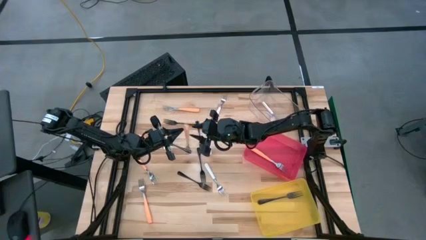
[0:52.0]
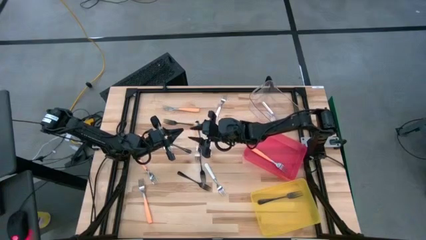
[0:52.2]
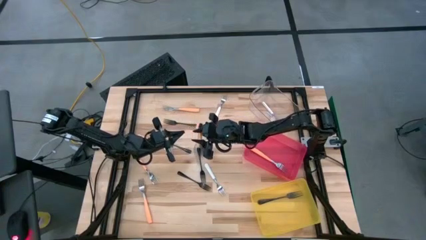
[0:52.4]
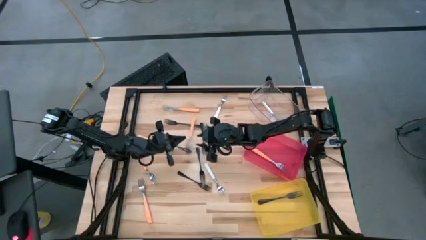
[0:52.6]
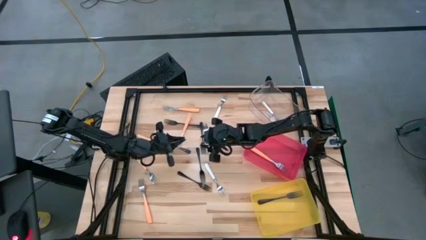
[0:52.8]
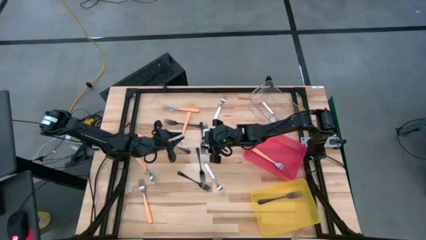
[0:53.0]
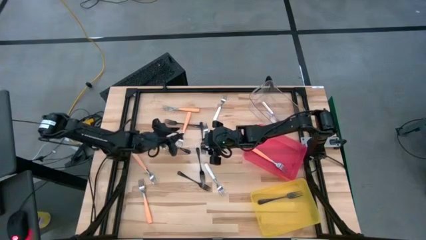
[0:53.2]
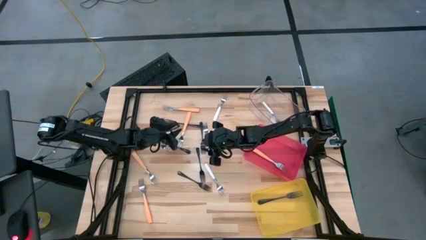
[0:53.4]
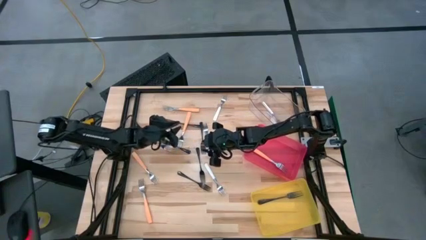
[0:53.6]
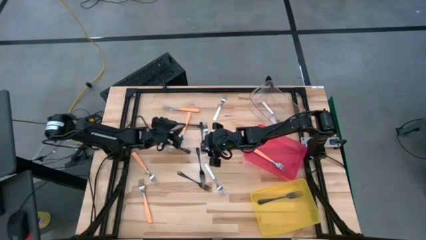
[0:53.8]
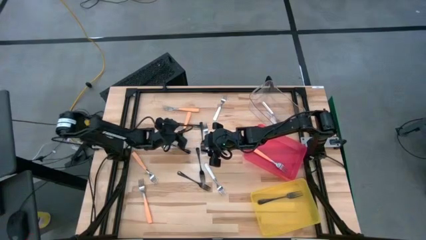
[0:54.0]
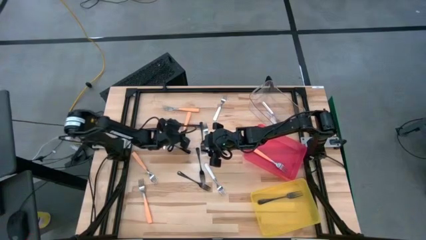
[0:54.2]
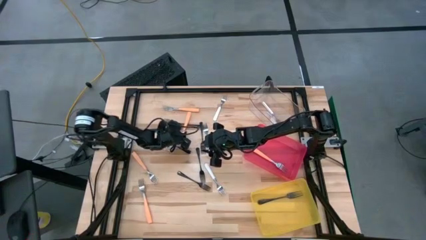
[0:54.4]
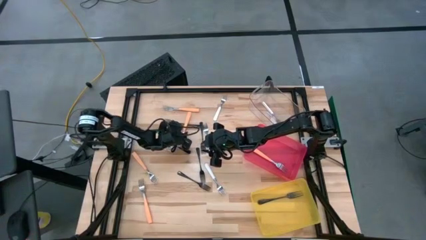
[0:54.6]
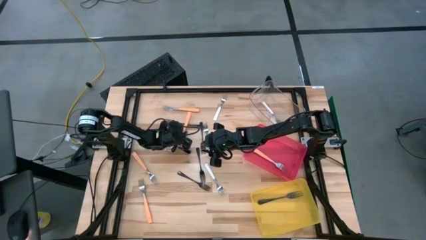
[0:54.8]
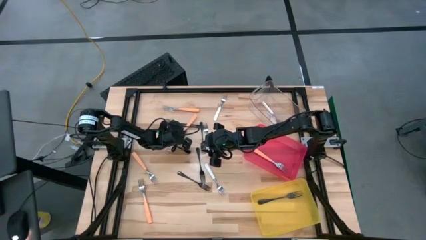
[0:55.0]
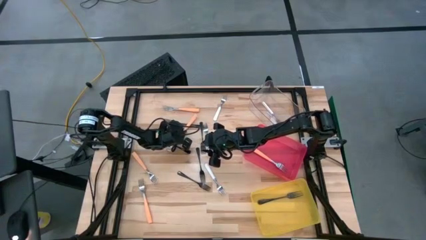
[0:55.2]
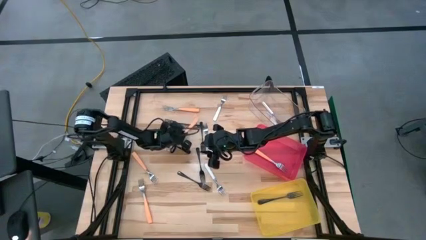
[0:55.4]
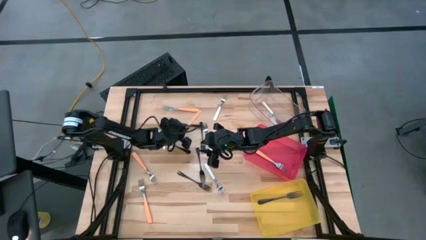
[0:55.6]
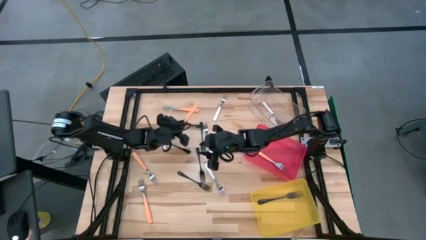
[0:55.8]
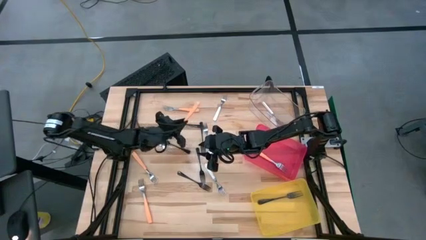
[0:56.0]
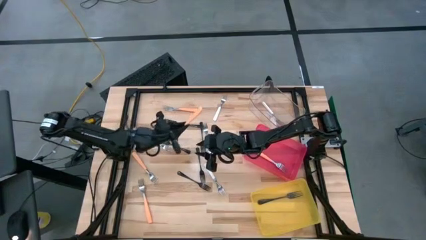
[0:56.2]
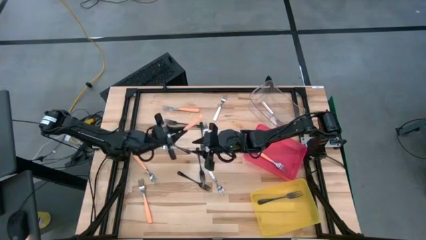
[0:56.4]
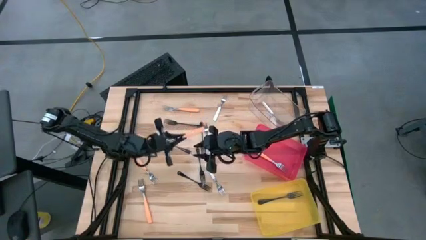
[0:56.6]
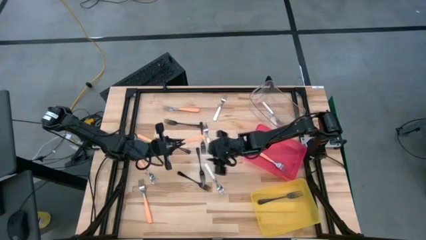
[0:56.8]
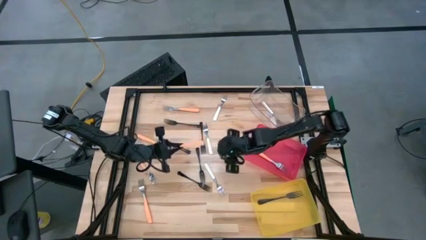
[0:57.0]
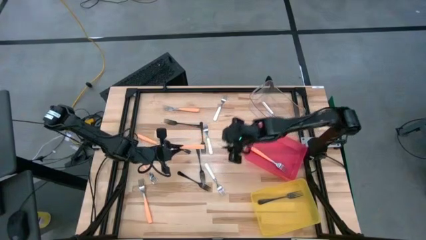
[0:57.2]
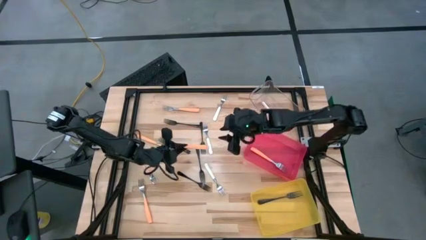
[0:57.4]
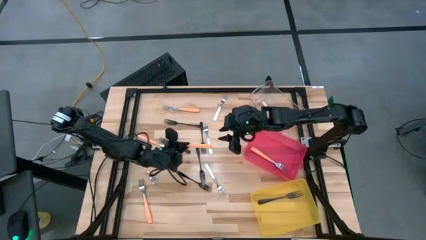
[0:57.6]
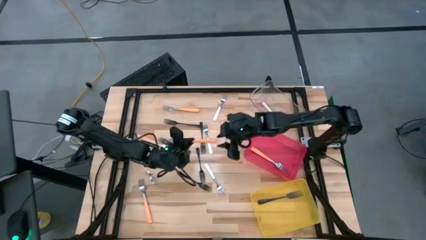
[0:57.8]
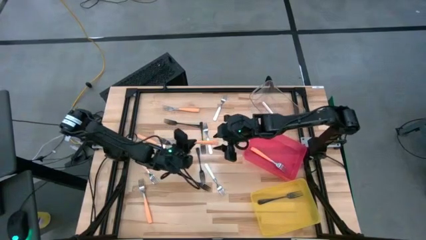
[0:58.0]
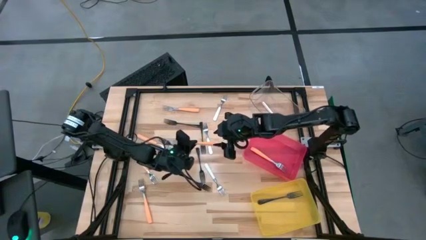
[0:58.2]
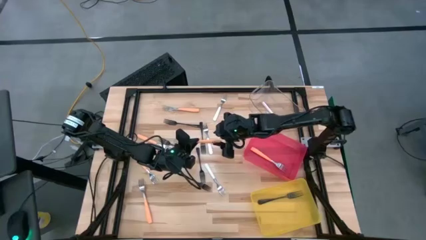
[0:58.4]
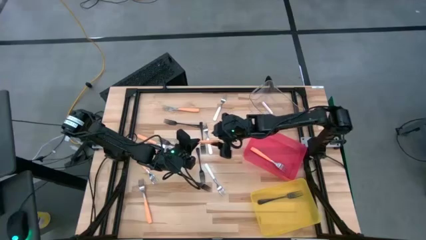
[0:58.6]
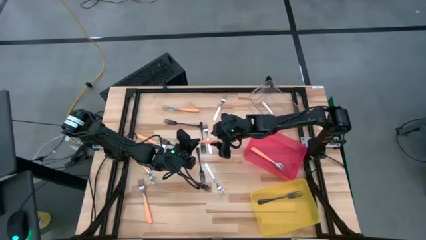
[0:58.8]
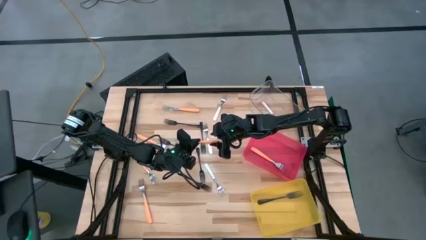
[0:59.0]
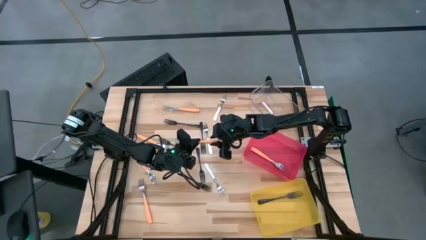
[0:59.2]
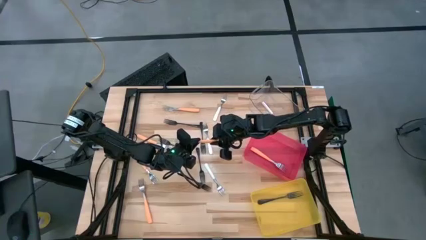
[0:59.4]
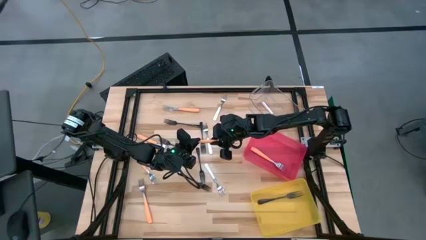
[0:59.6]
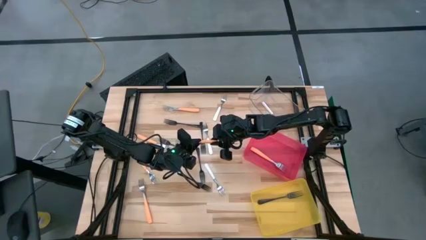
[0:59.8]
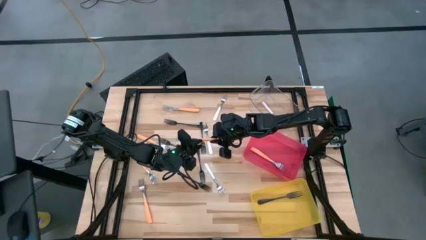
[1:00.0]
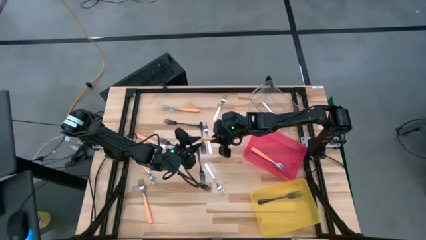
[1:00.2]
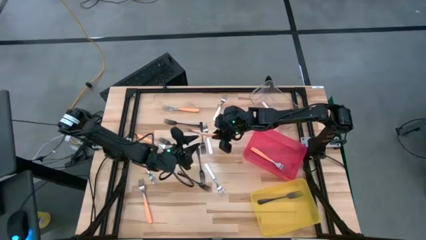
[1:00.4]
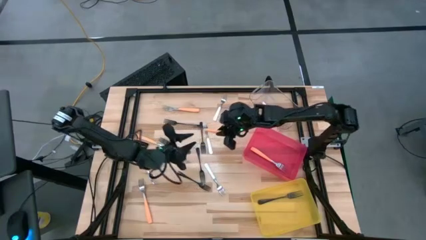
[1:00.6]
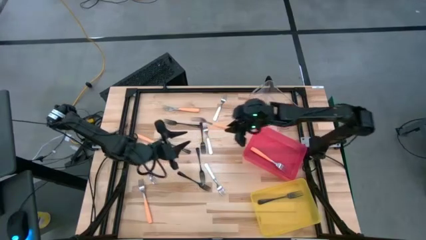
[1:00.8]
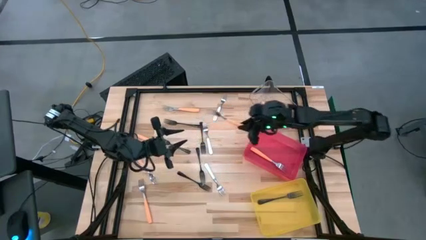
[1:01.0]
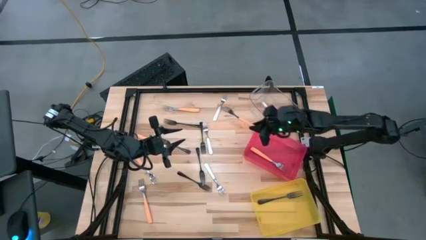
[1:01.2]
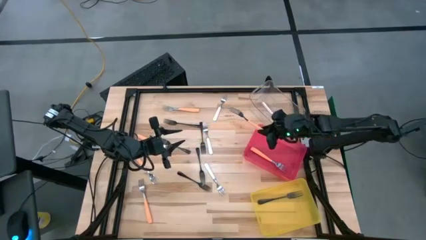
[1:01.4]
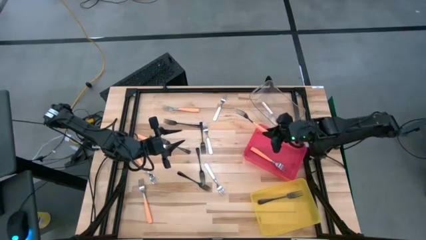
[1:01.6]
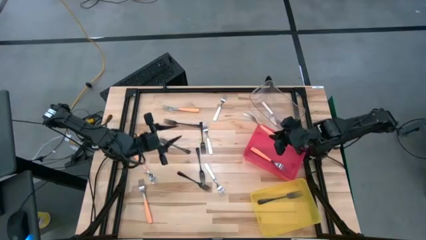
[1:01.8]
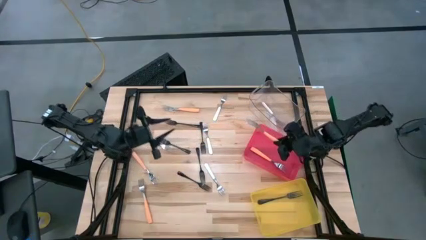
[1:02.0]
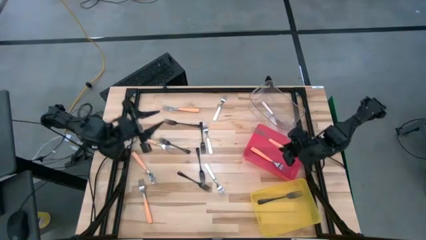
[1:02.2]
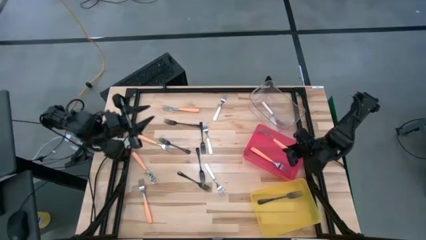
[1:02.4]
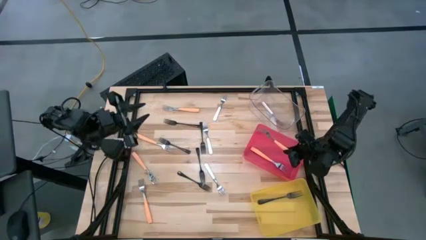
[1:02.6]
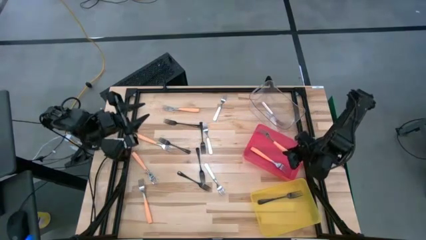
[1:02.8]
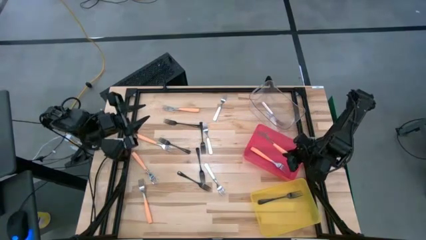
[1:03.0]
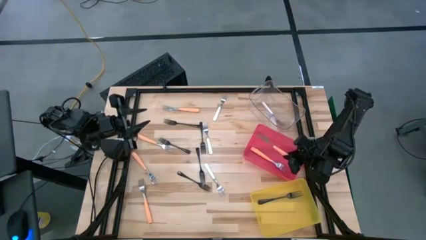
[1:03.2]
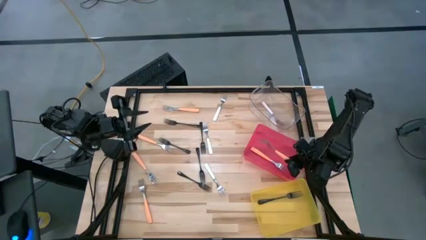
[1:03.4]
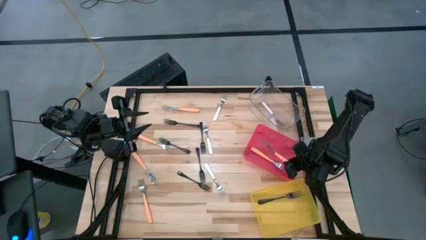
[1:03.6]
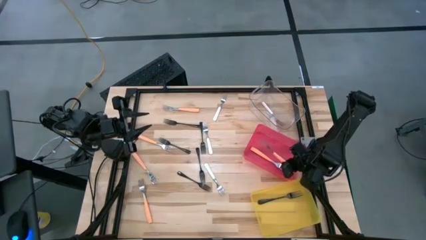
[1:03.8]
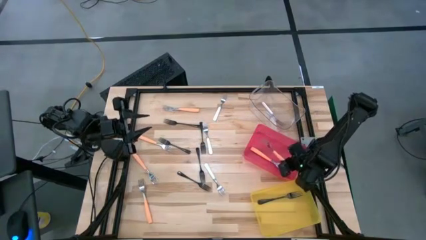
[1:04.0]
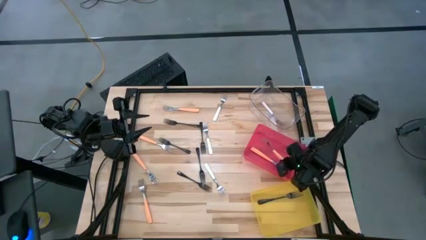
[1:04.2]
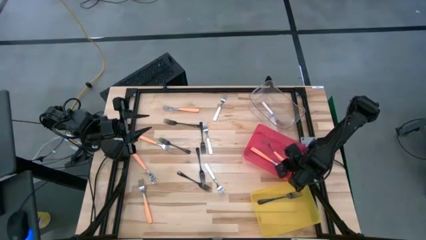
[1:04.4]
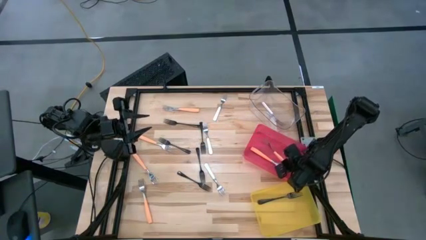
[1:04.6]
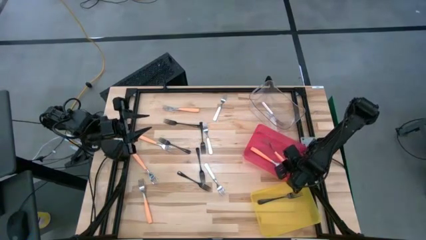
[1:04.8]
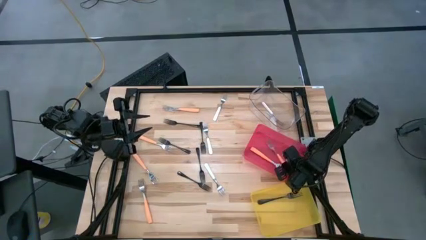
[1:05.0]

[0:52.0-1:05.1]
Task: Sort silverware by color (type)
Put the orange fork into the red bin

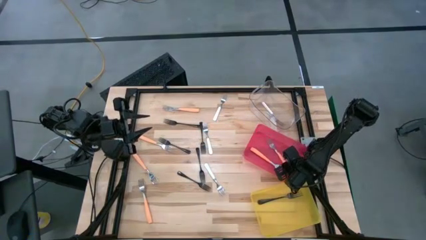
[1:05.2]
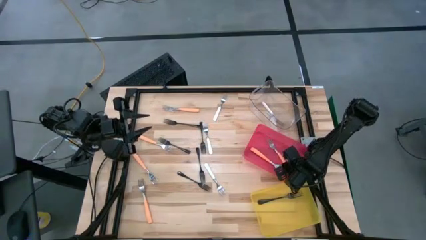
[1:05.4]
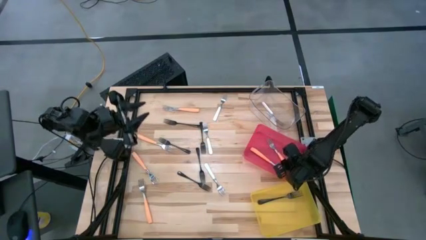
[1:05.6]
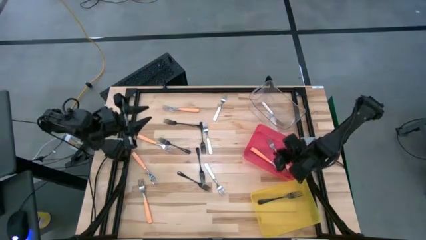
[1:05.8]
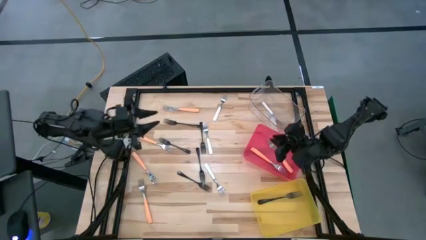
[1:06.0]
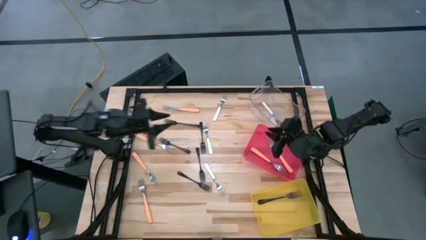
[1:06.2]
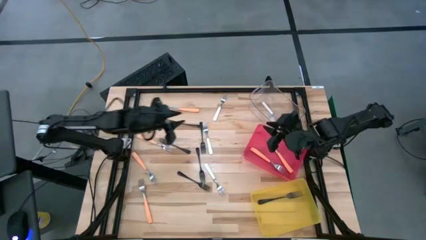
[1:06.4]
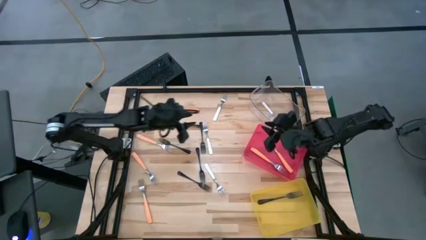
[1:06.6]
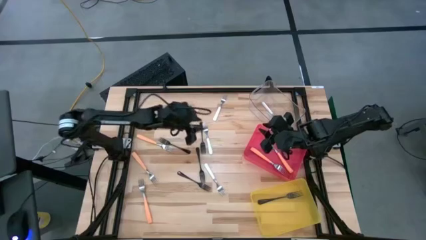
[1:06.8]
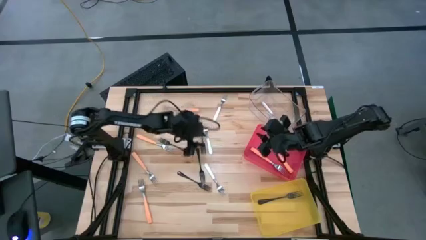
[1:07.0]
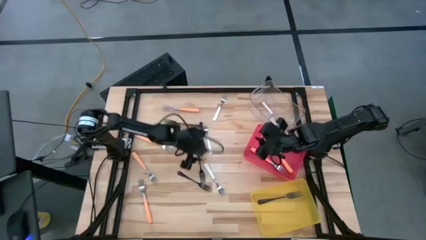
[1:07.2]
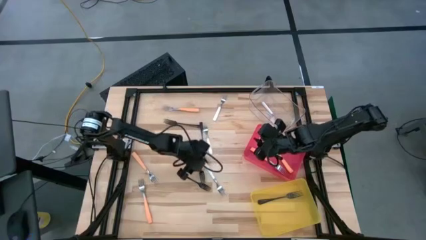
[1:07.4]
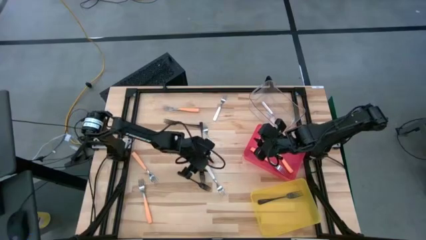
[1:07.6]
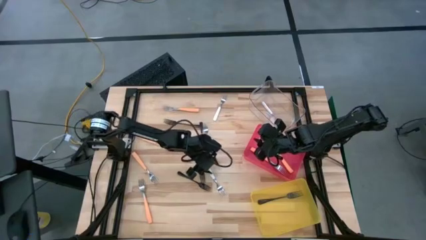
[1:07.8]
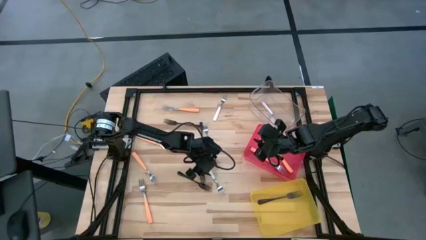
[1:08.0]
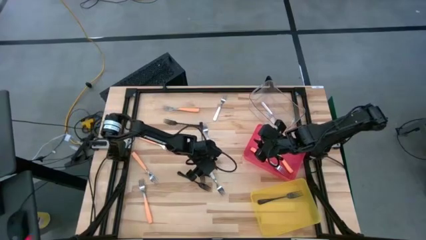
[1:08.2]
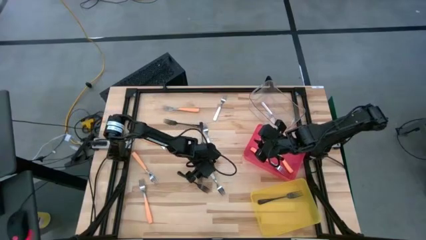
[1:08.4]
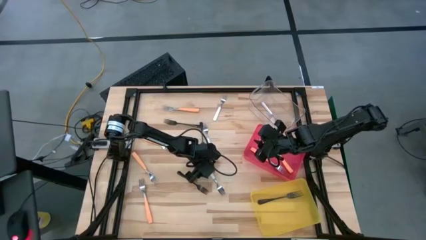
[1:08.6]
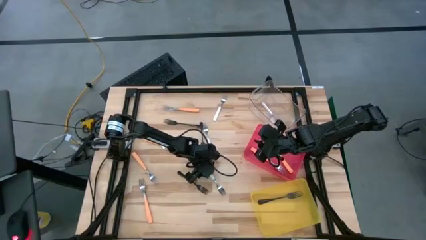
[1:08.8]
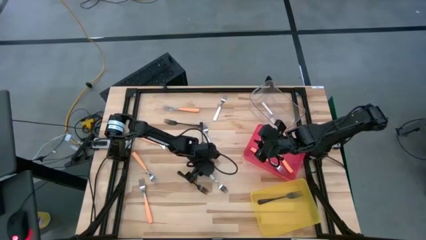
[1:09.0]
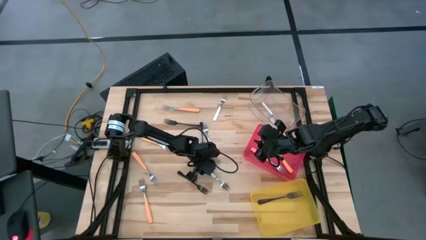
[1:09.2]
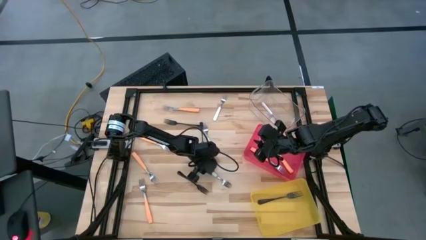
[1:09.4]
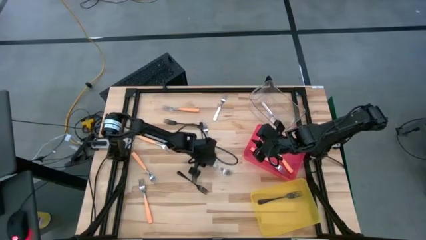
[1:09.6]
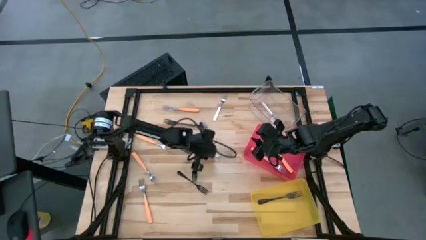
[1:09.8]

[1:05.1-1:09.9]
Put the white fork into the transparent bin
